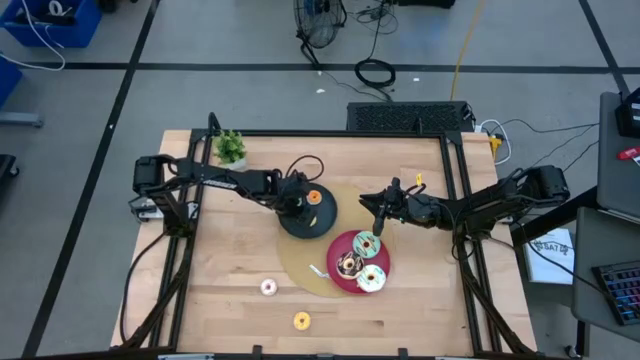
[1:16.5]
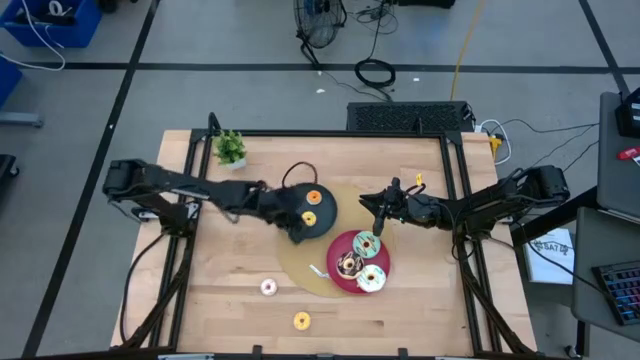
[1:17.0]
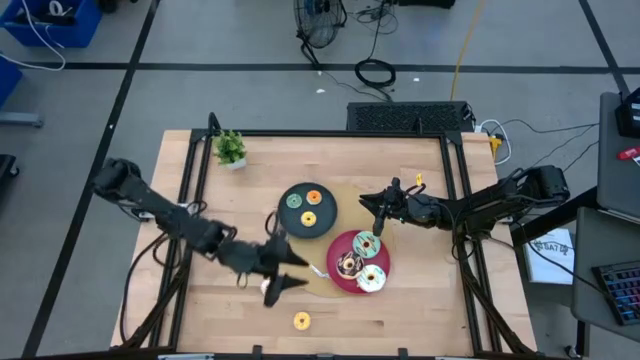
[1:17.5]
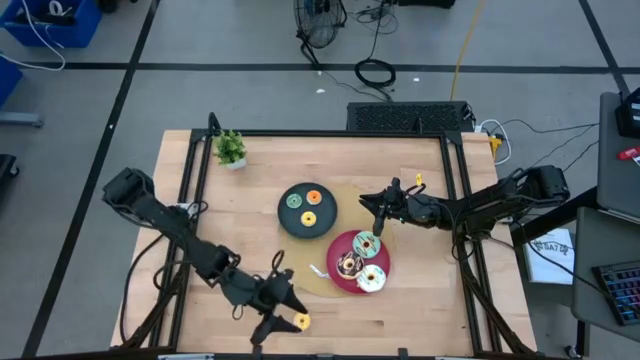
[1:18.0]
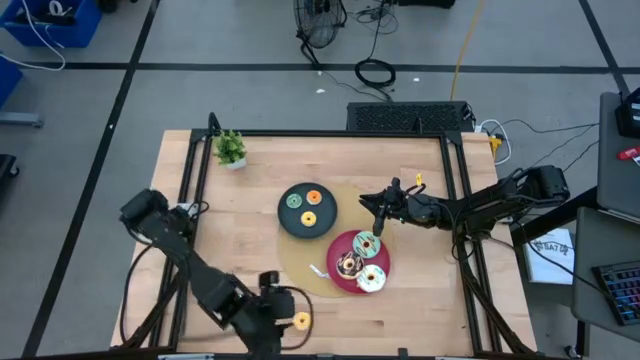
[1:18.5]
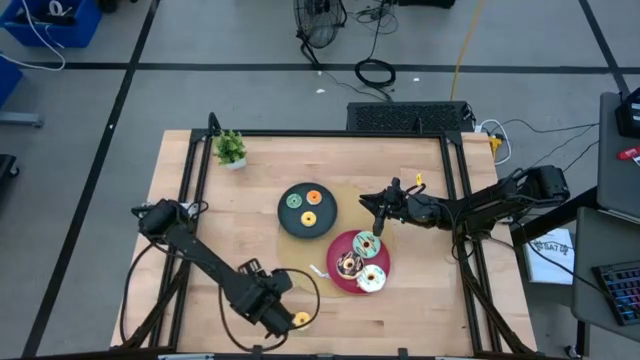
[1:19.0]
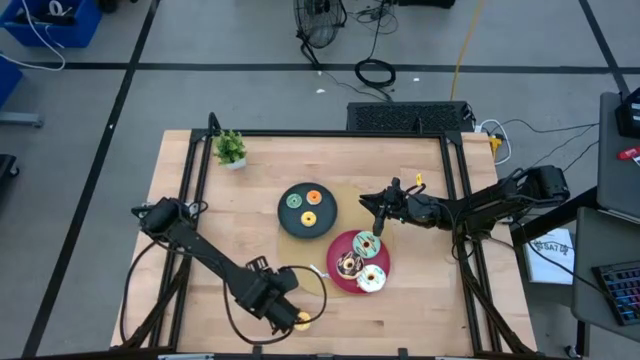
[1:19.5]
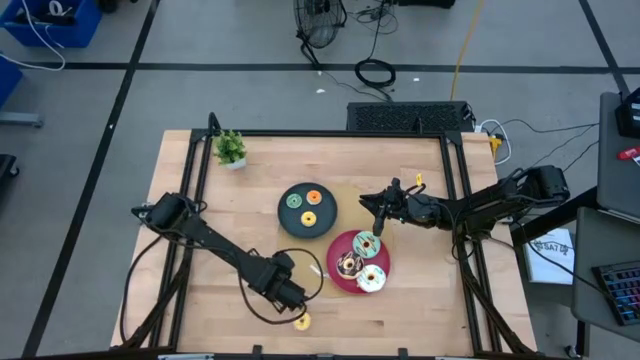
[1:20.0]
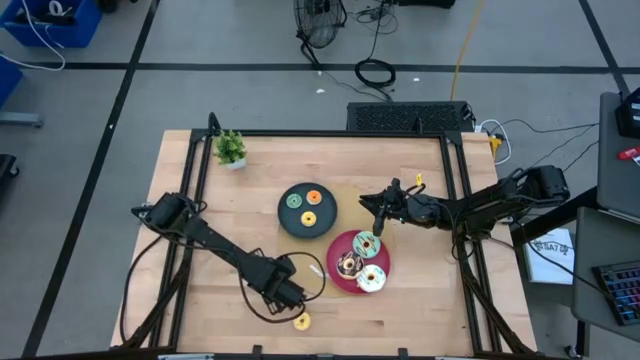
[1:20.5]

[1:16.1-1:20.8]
Task: Pick & Place donuts
Put the small white doughnut on the blue plate

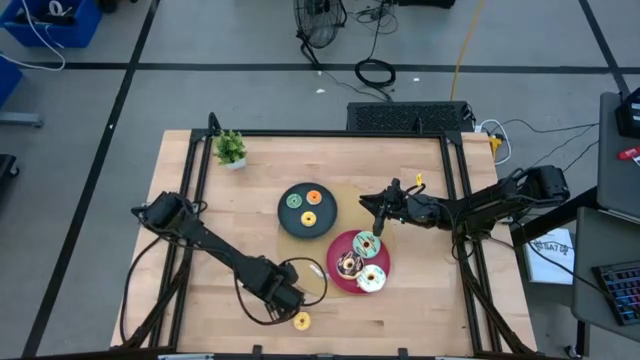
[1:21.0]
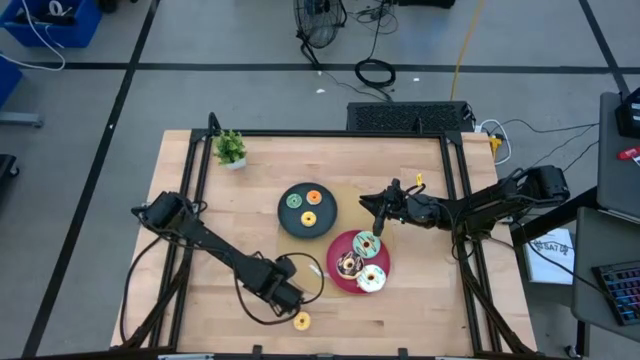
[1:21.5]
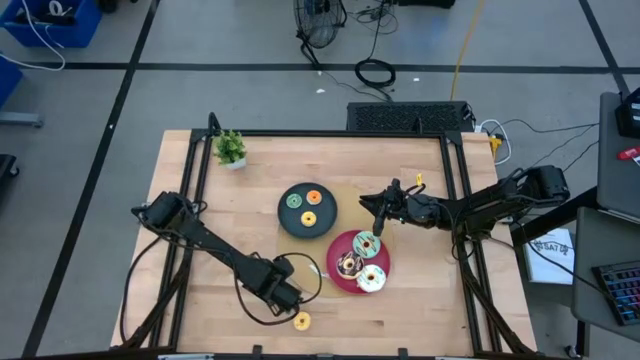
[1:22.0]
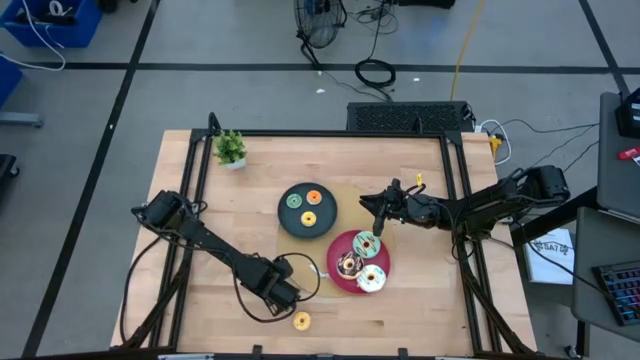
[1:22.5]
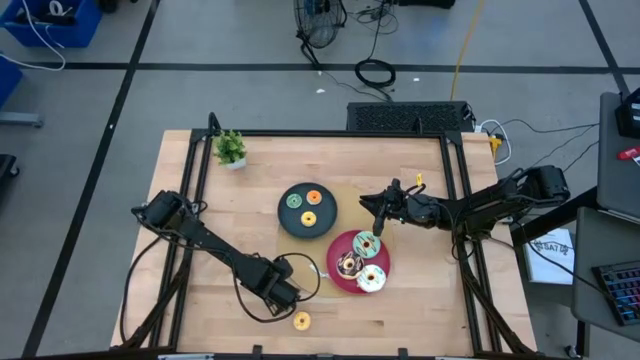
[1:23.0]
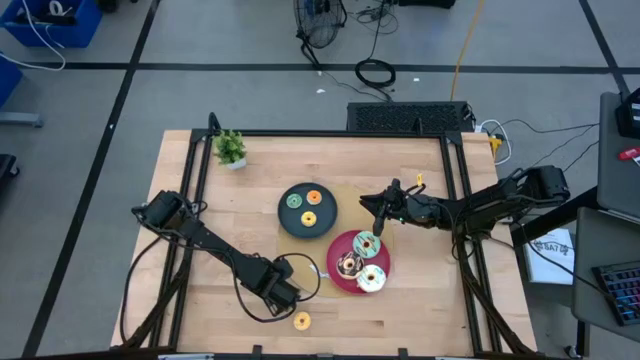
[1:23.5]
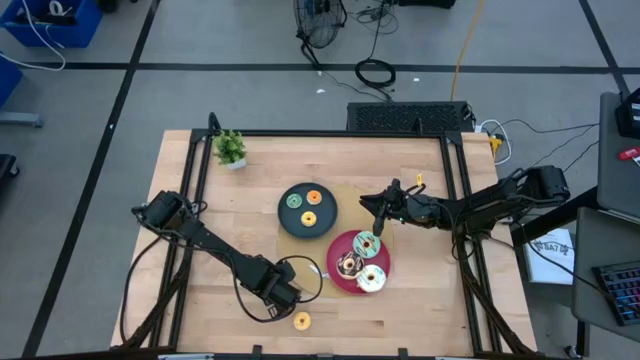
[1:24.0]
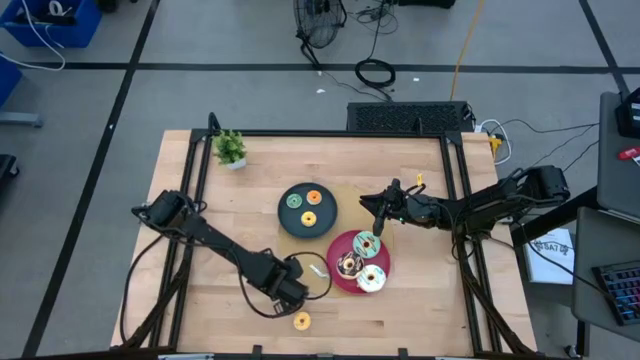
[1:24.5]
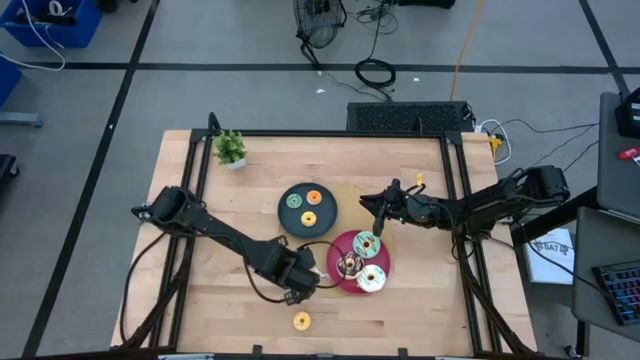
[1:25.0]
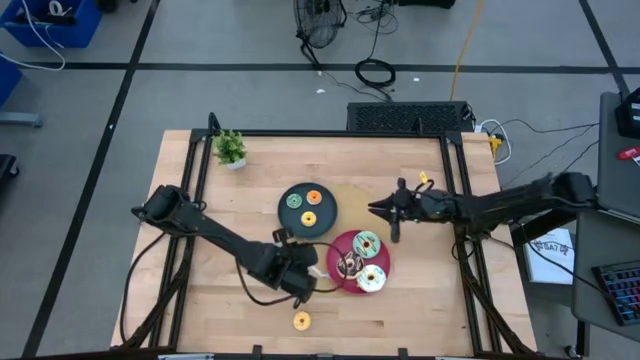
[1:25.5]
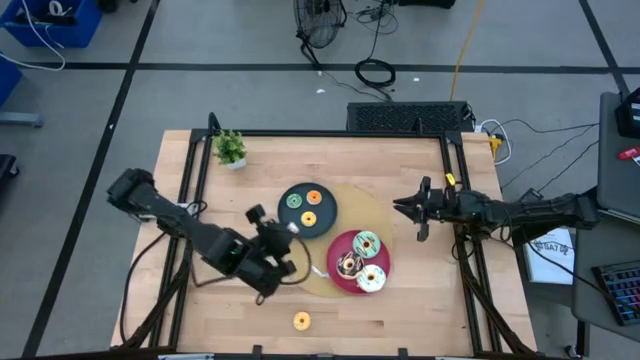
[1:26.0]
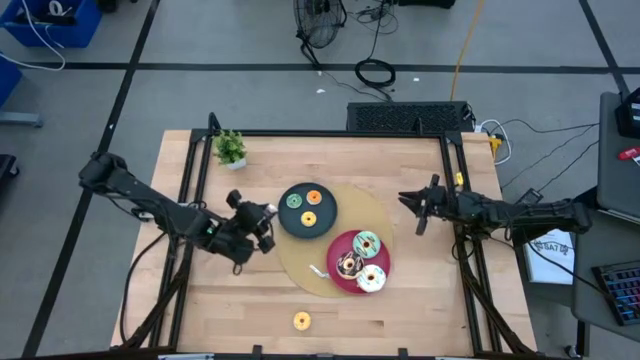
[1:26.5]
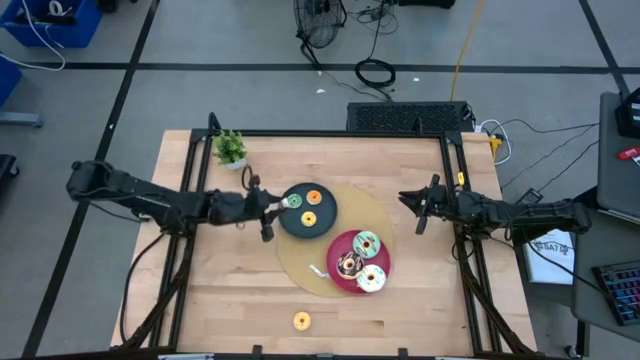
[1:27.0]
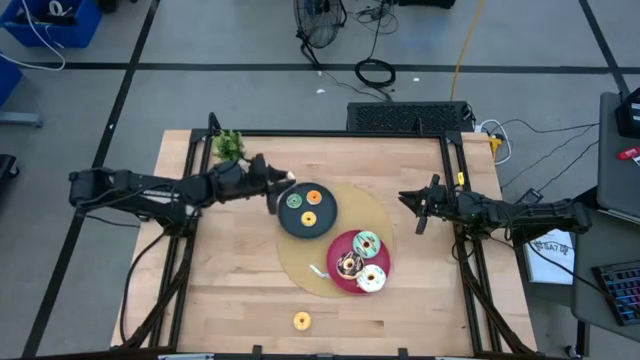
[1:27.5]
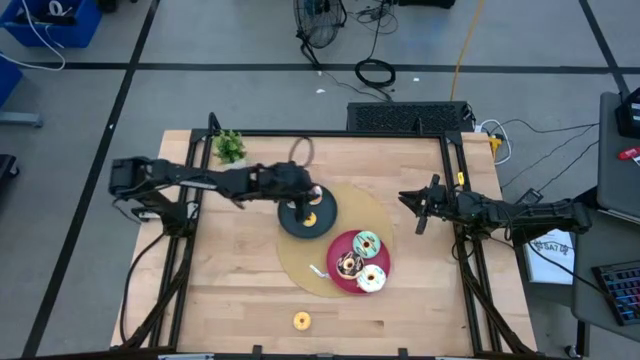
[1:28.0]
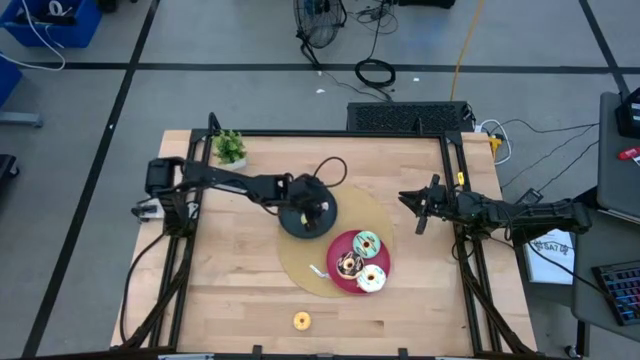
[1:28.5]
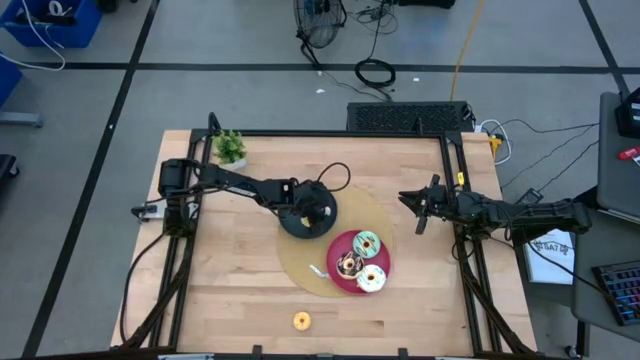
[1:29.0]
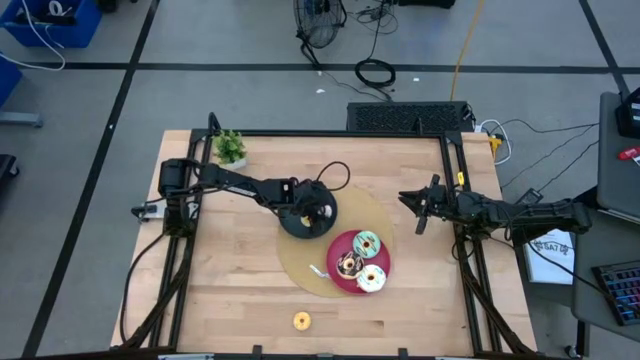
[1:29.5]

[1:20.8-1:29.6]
Put the small white doughnut on the blue plate
